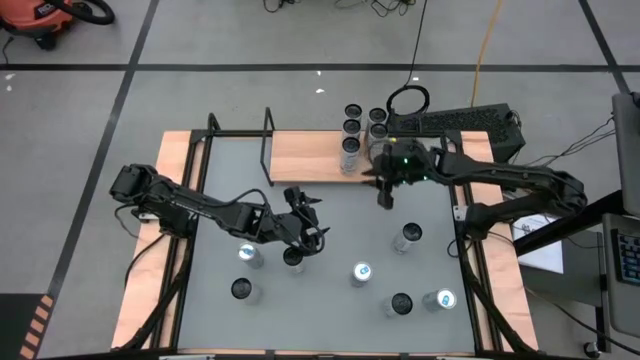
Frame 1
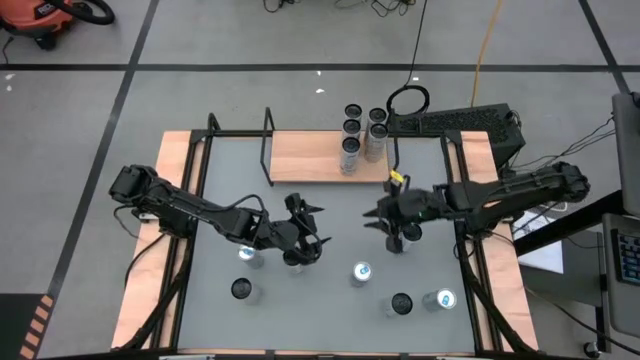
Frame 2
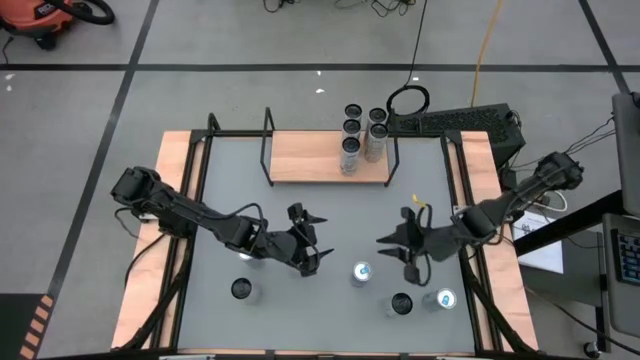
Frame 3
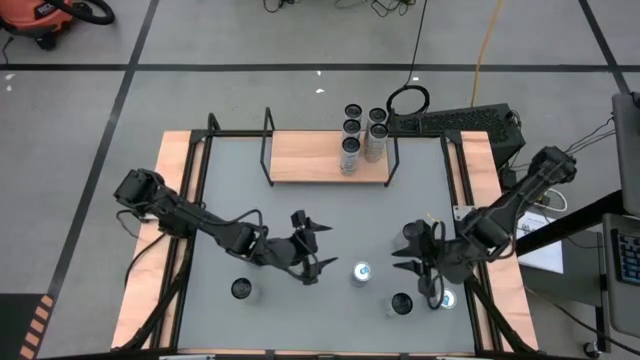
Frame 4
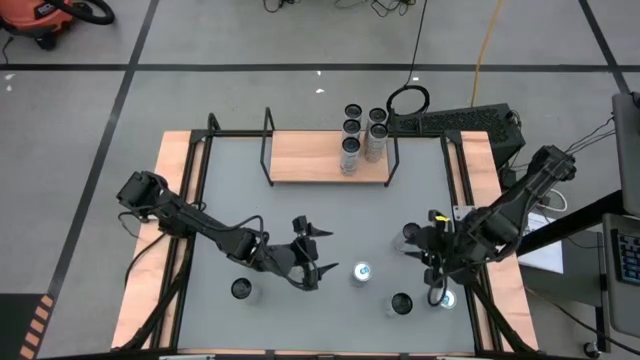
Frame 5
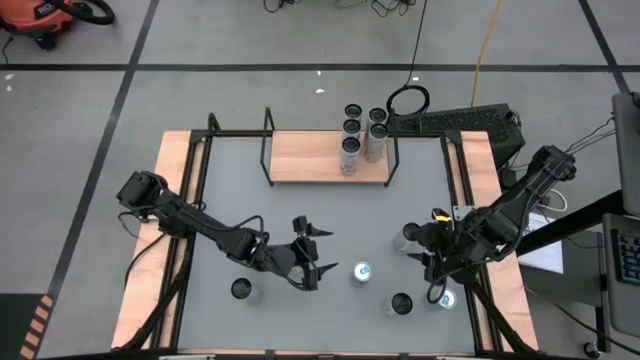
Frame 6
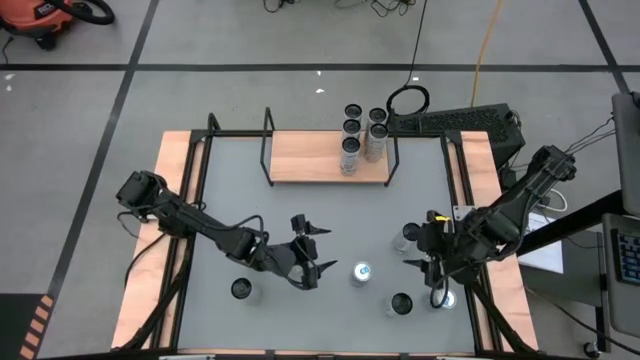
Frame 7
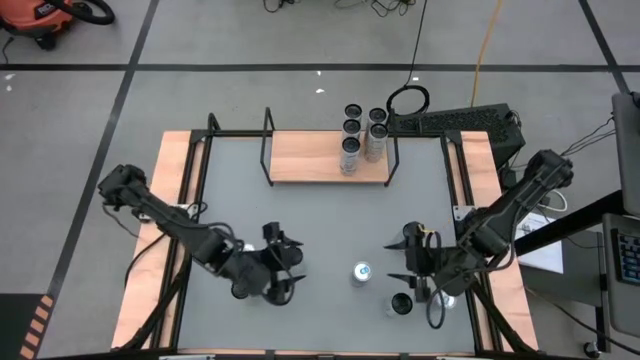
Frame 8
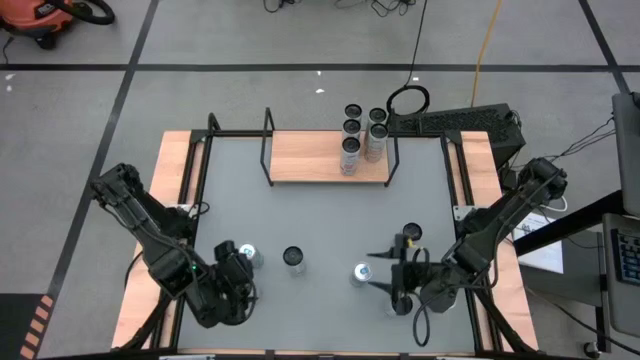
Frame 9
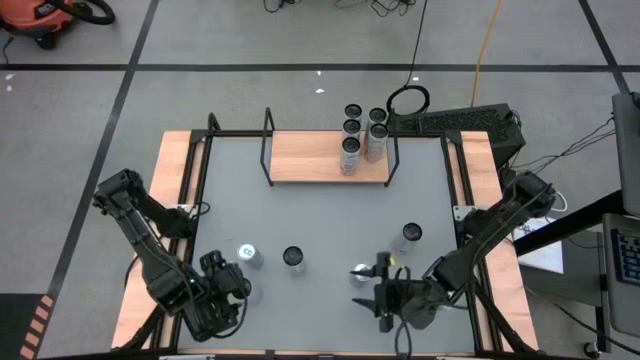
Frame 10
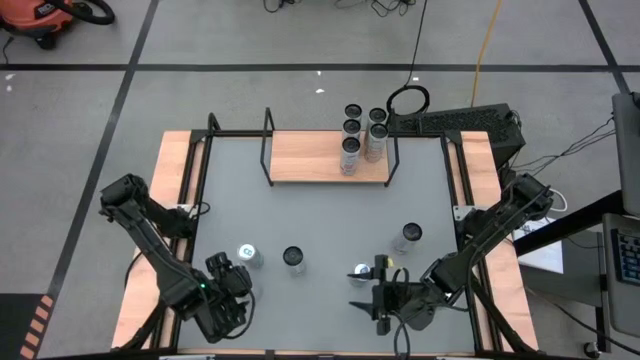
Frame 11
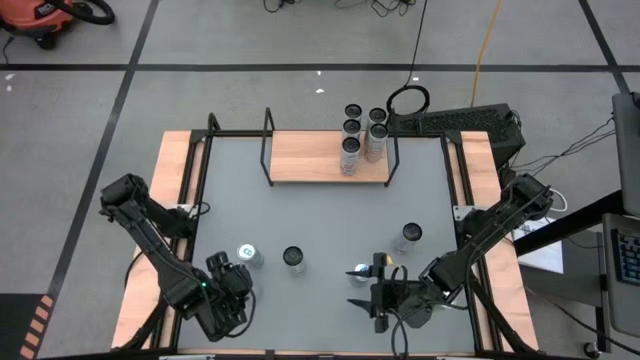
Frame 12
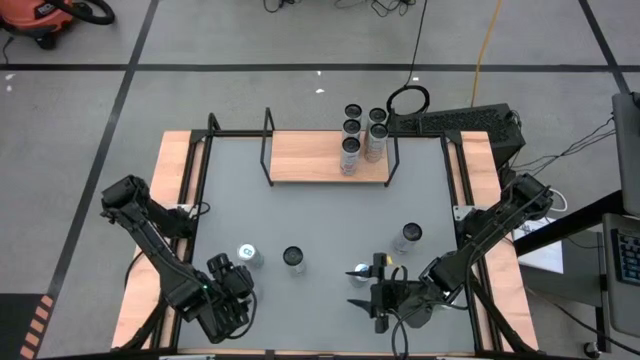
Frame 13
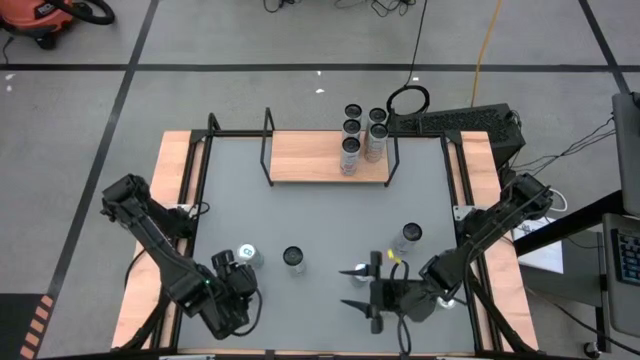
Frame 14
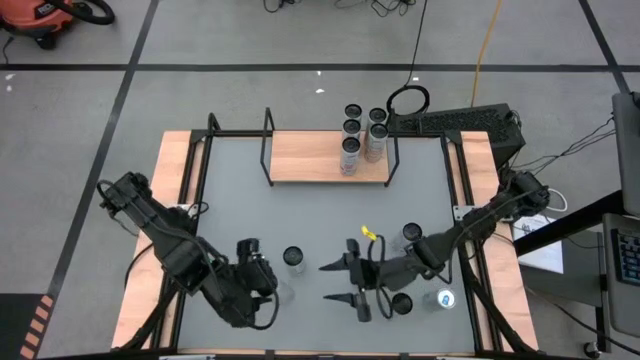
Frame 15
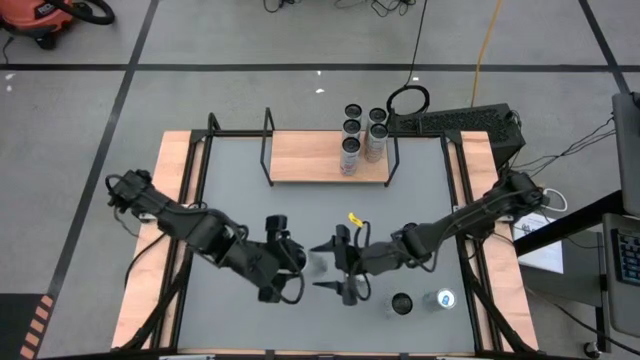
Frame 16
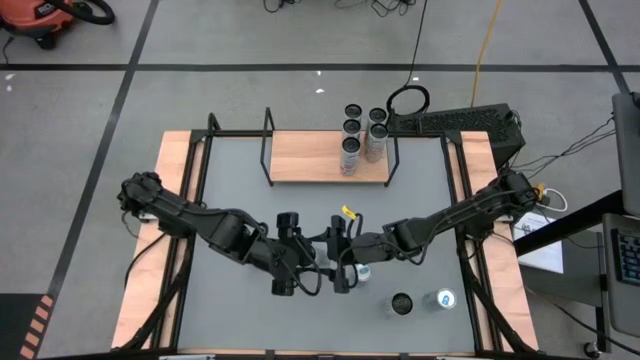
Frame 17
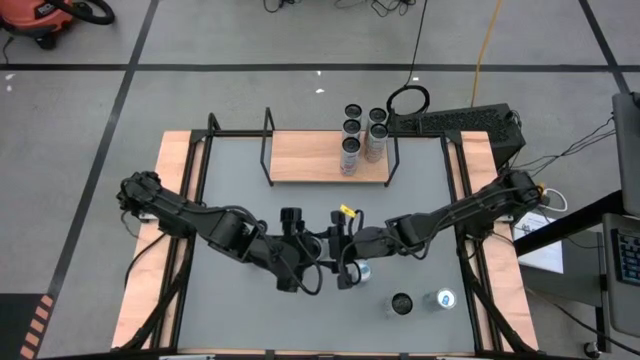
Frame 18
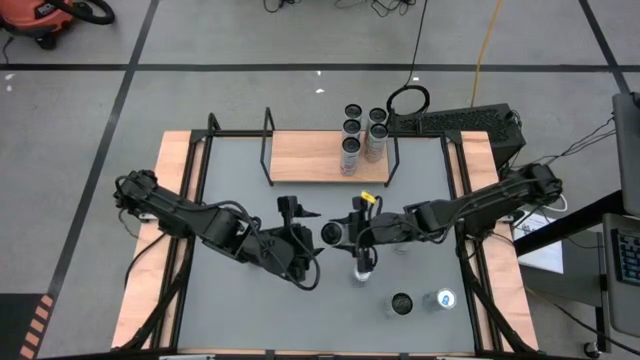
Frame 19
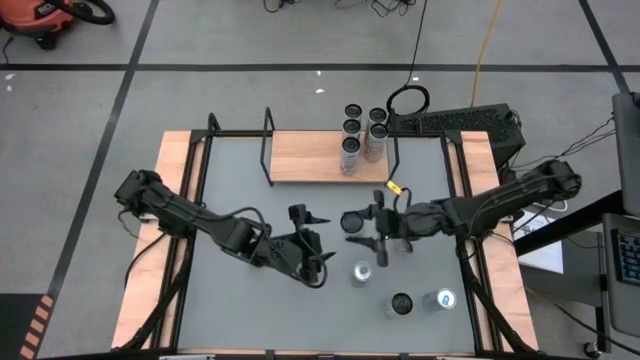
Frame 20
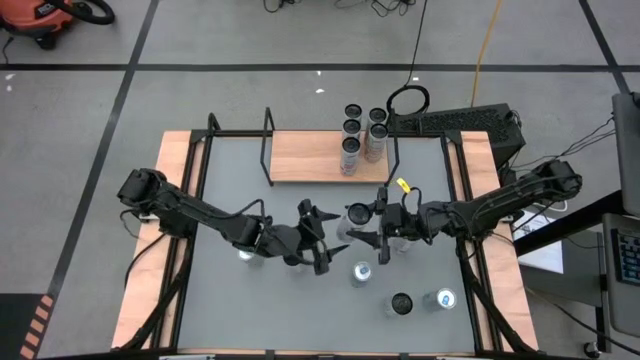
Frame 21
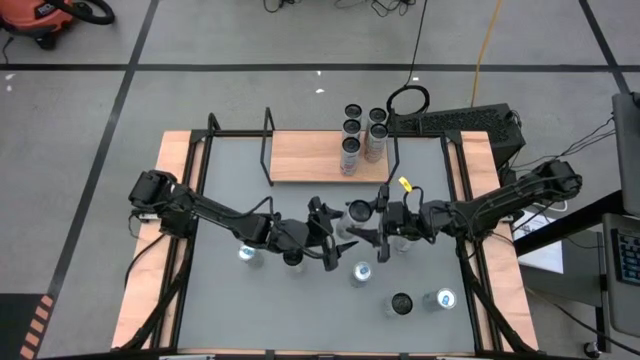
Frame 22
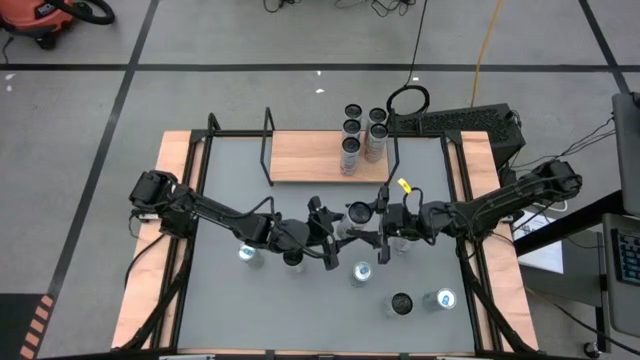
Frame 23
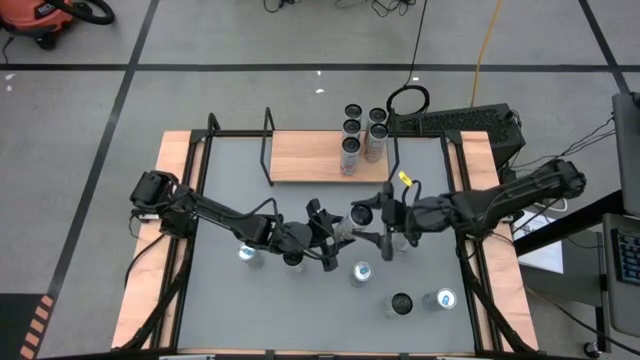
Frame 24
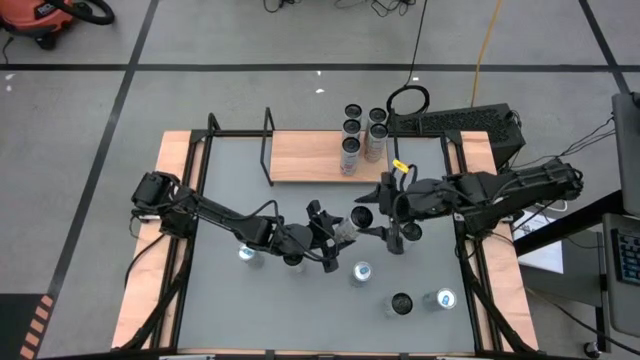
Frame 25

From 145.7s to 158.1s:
Task: Place canned beverage on shelf
Put the white yellow soda can on the shelf aligned with the white yellow soda cans

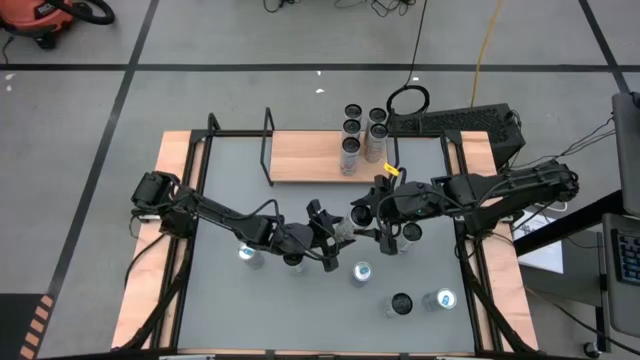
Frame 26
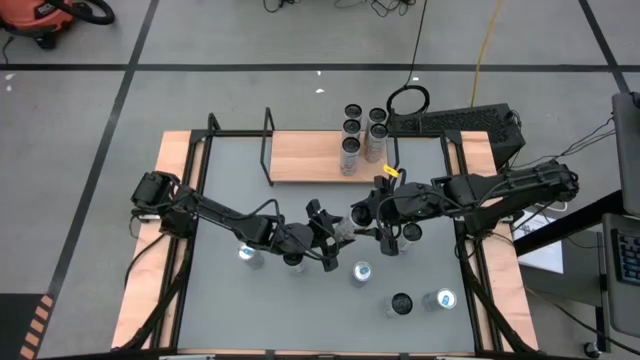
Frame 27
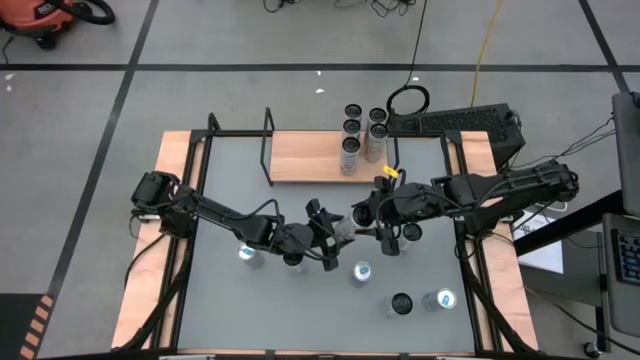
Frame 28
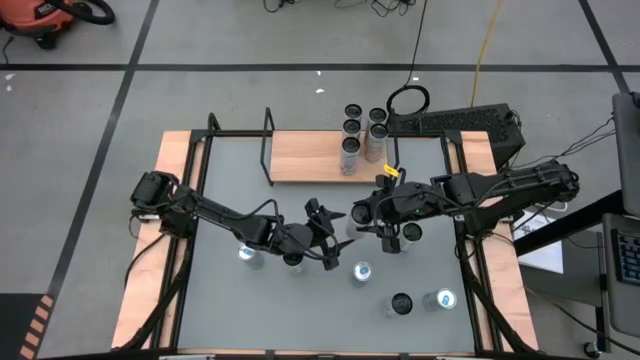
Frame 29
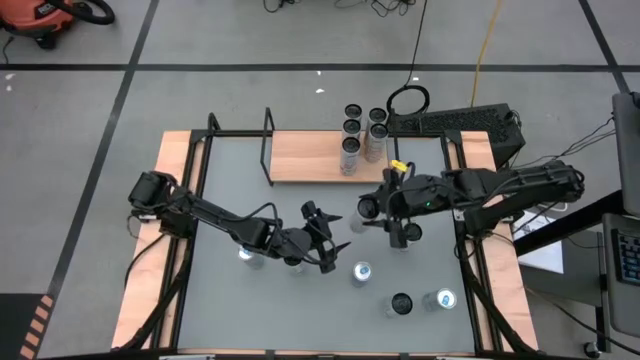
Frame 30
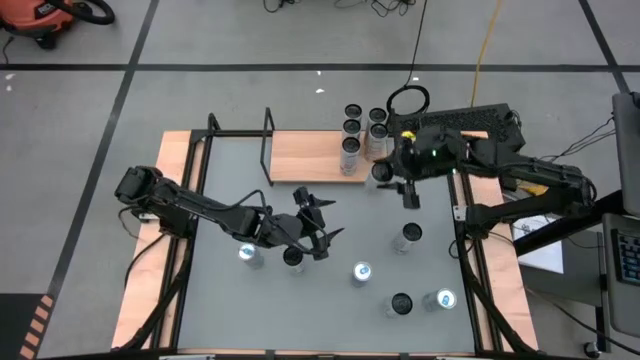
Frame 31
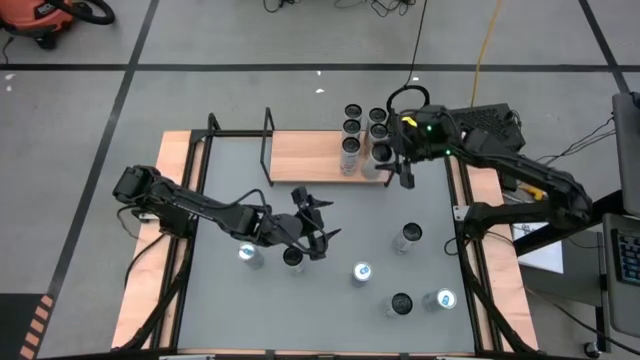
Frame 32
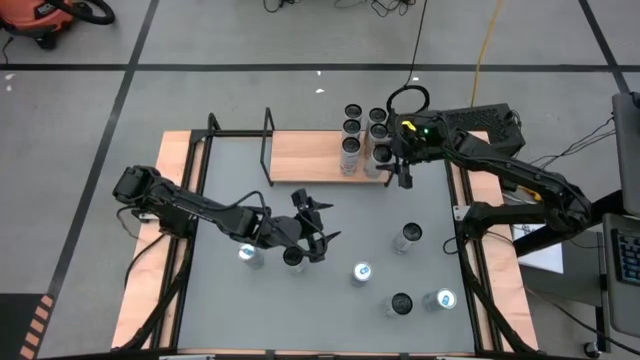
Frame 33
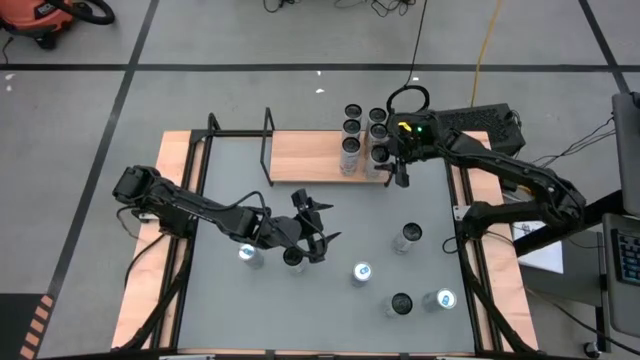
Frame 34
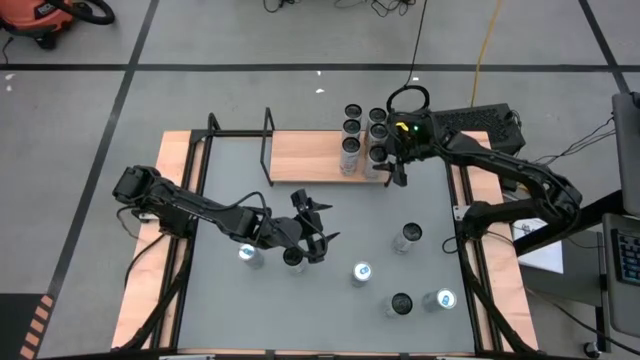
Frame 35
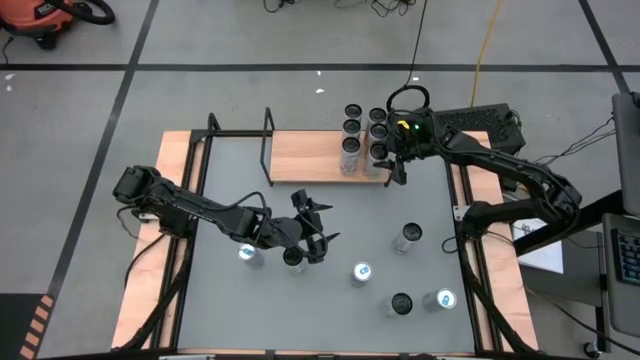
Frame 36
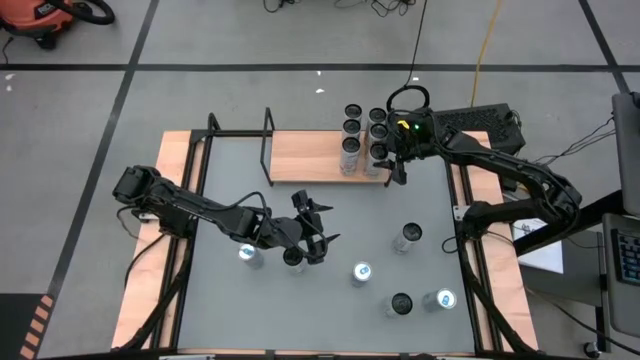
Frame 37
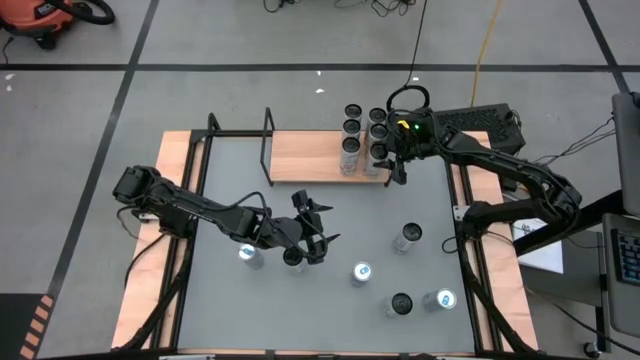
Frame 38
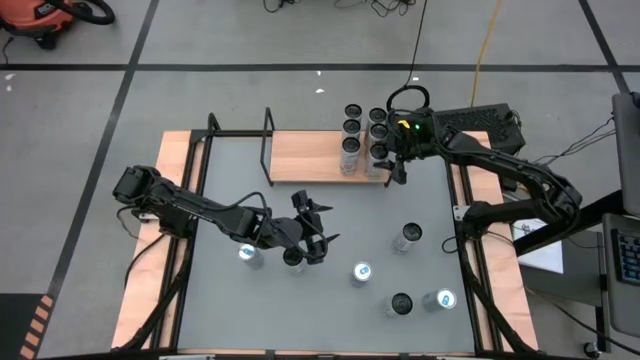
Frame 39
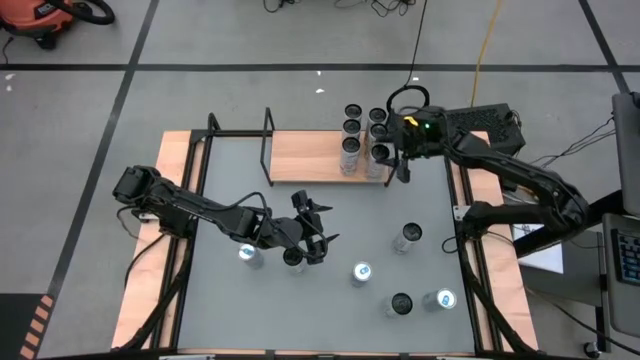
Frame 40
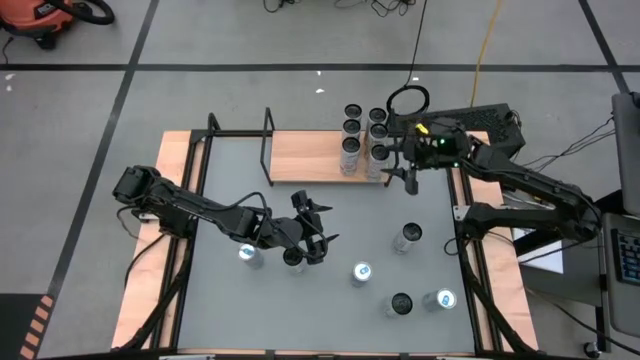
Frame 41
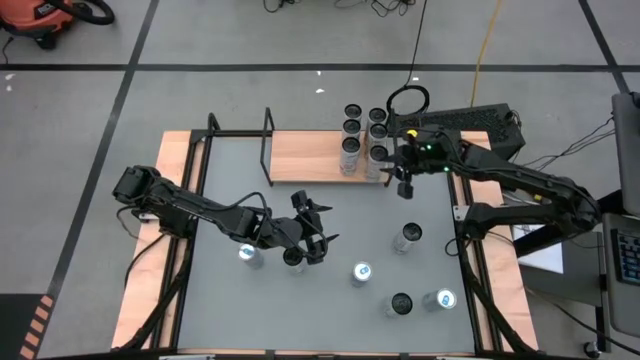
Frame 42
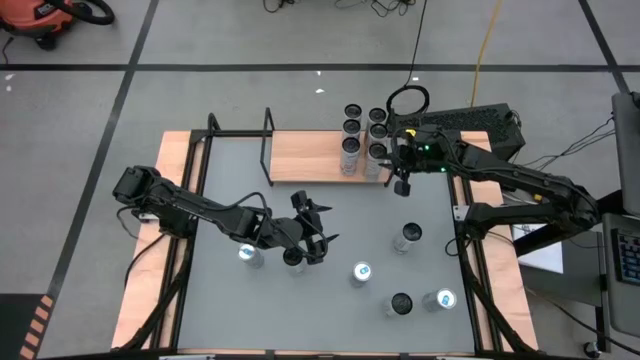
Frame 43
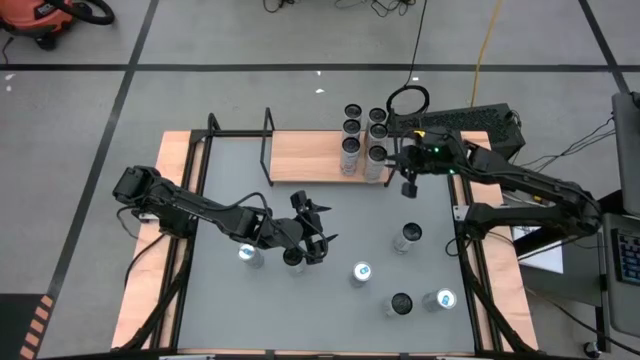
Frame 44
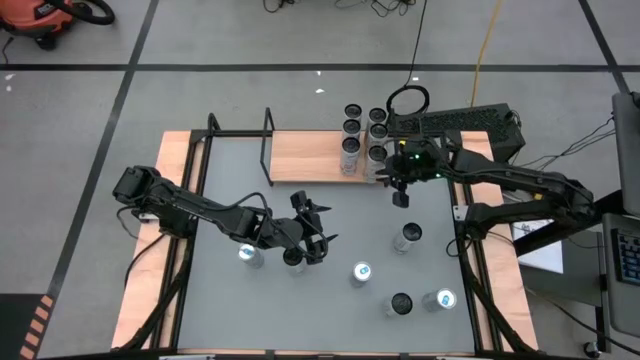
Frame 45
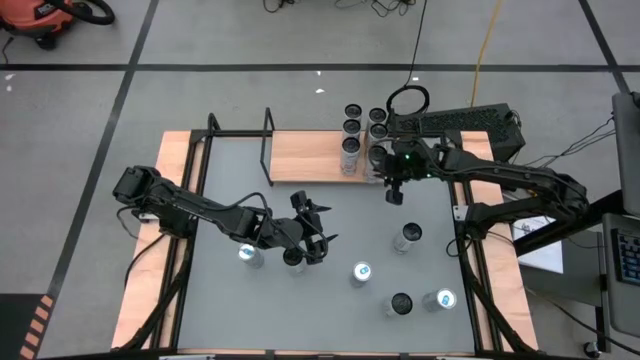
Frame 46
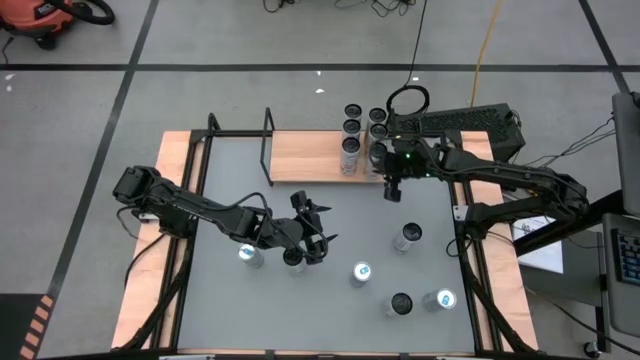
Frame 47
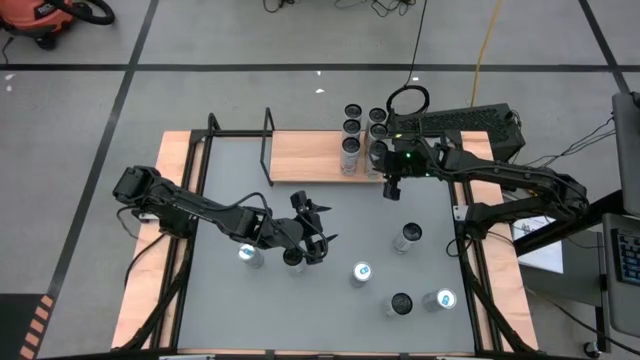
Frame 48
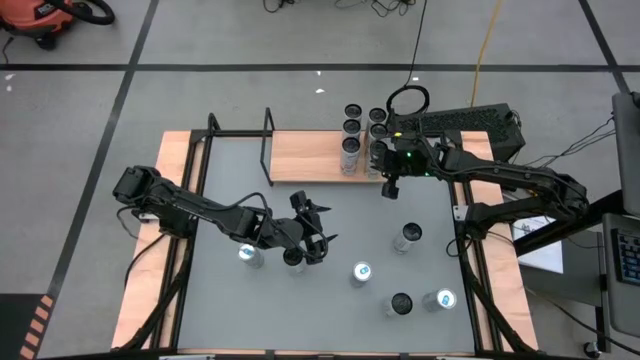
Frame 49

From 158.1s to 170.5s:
Put the white yellow soda can on the shelf aligned with the white yellow soda cans
